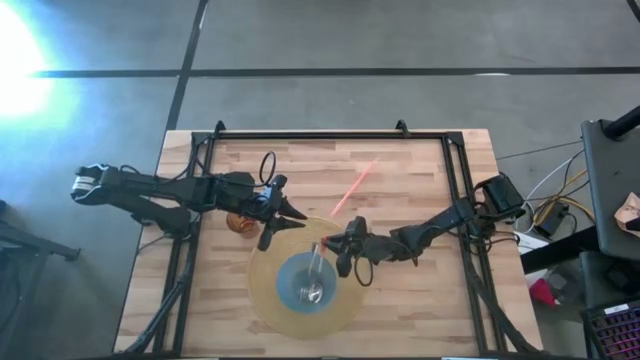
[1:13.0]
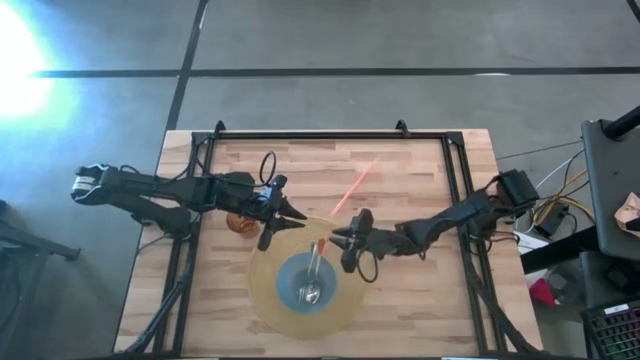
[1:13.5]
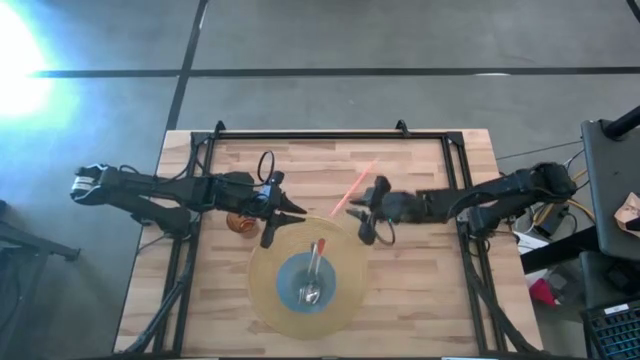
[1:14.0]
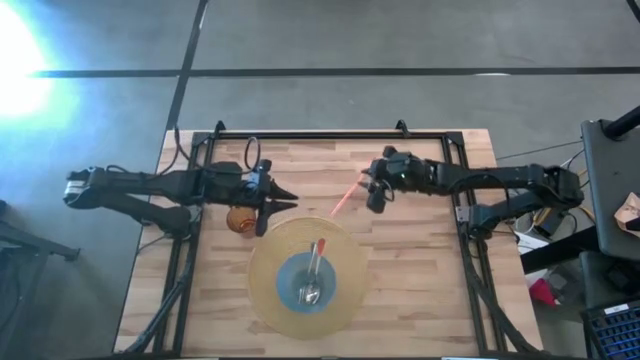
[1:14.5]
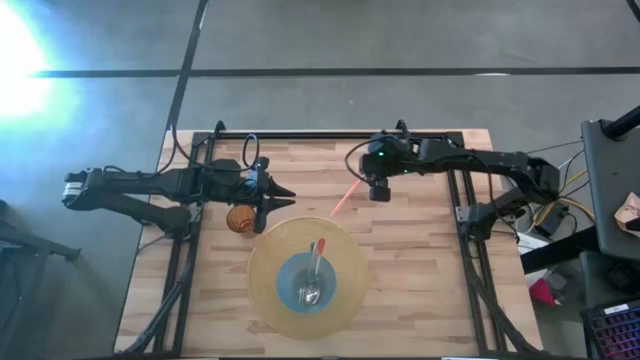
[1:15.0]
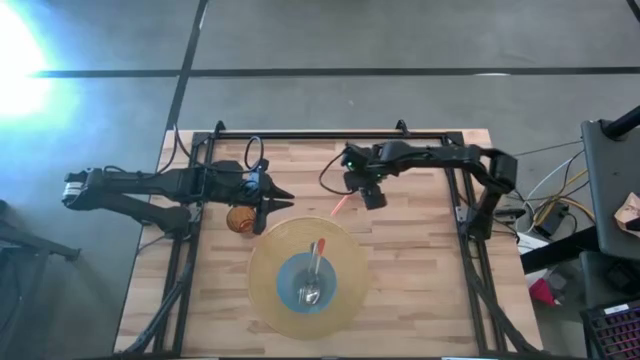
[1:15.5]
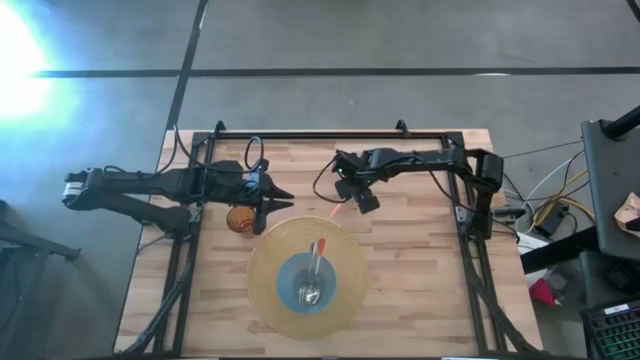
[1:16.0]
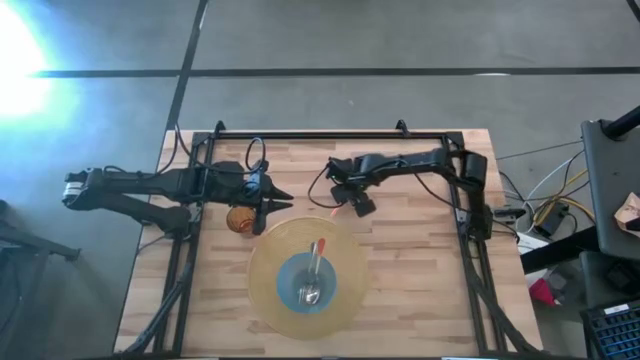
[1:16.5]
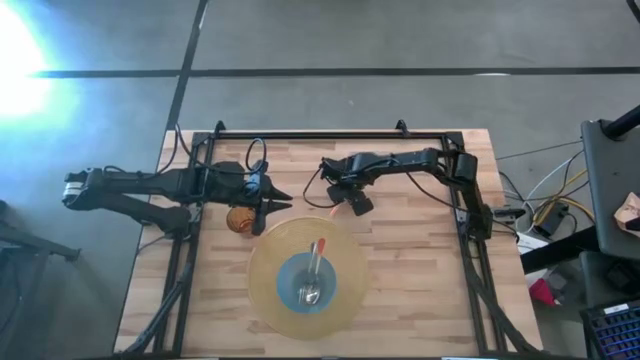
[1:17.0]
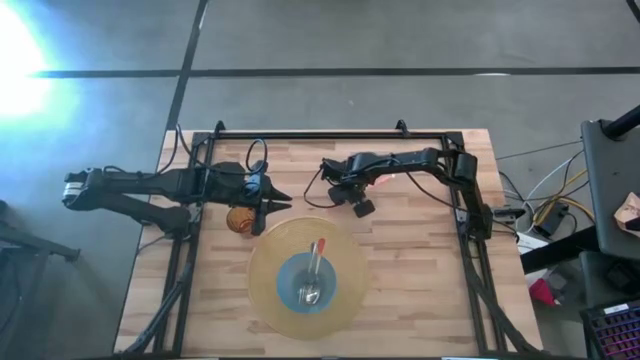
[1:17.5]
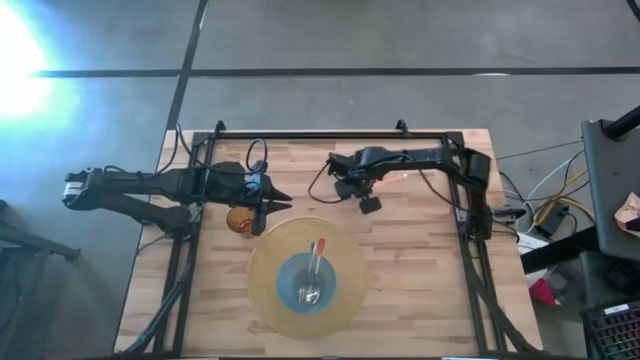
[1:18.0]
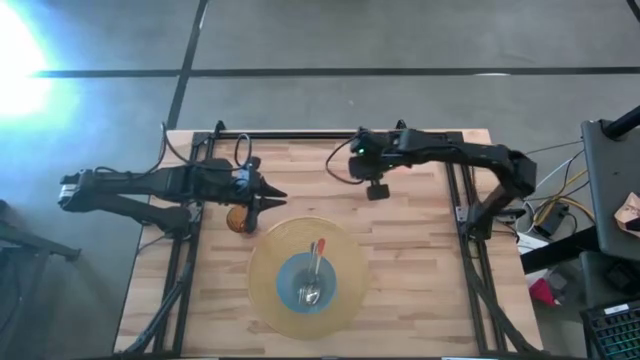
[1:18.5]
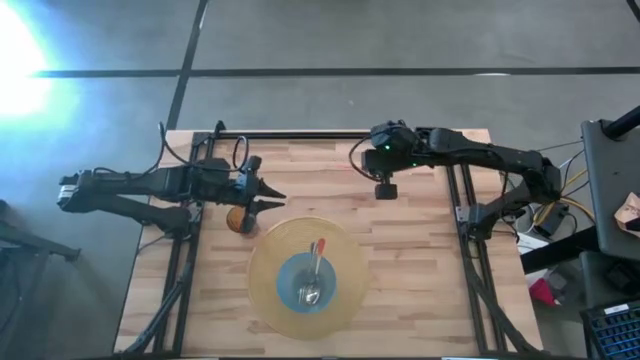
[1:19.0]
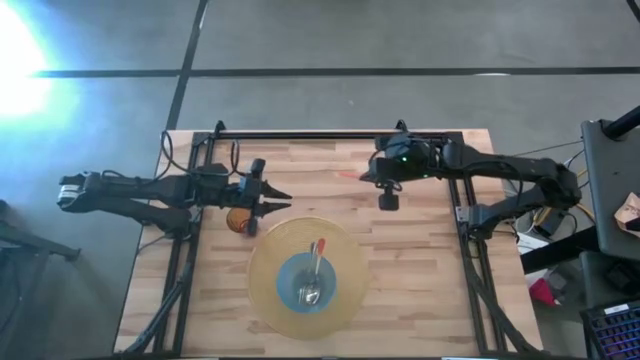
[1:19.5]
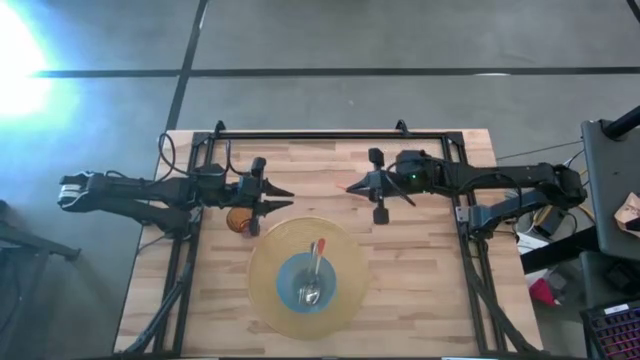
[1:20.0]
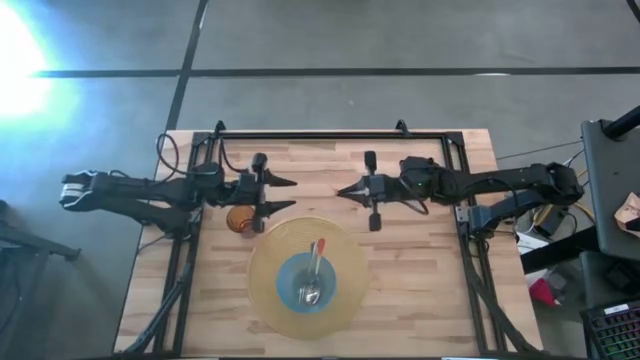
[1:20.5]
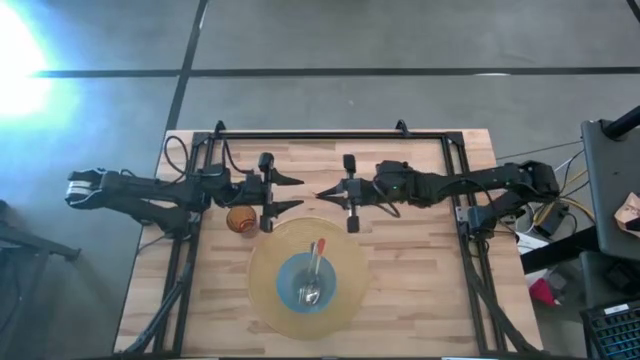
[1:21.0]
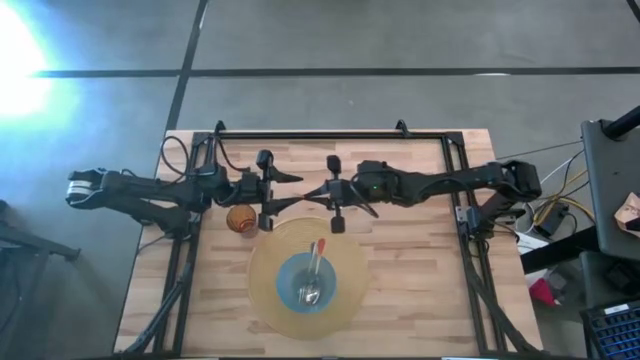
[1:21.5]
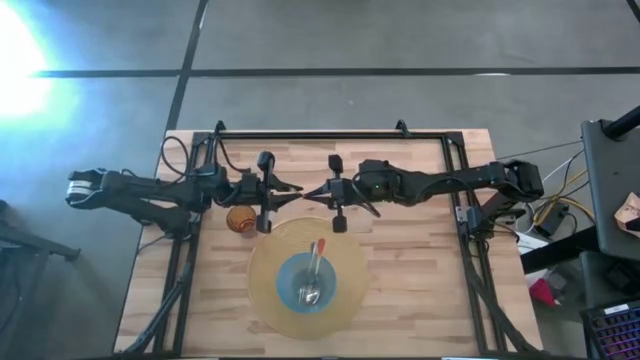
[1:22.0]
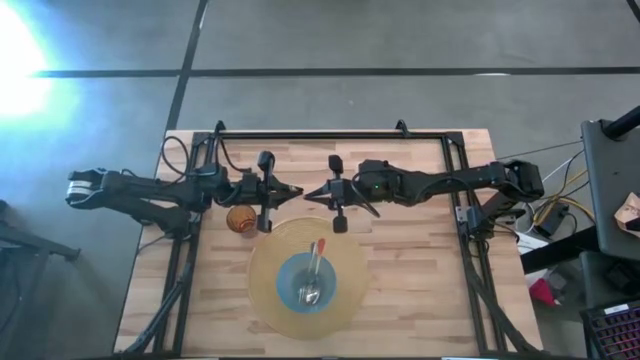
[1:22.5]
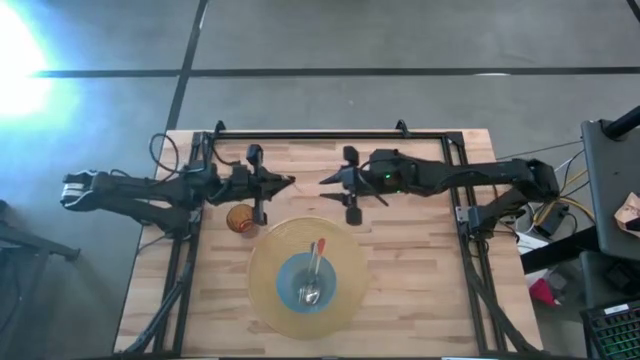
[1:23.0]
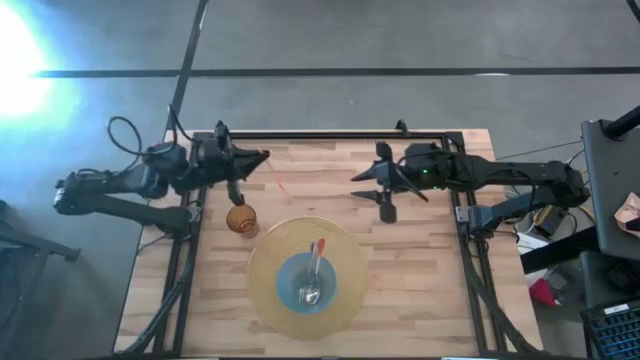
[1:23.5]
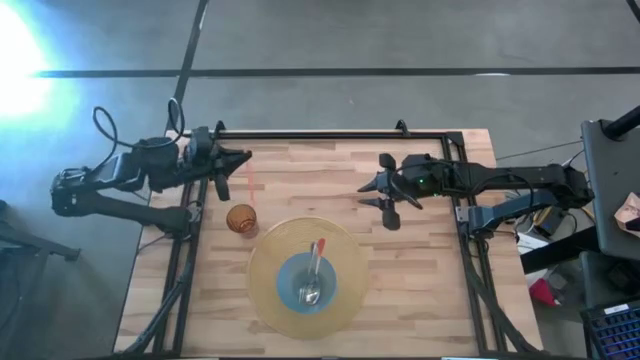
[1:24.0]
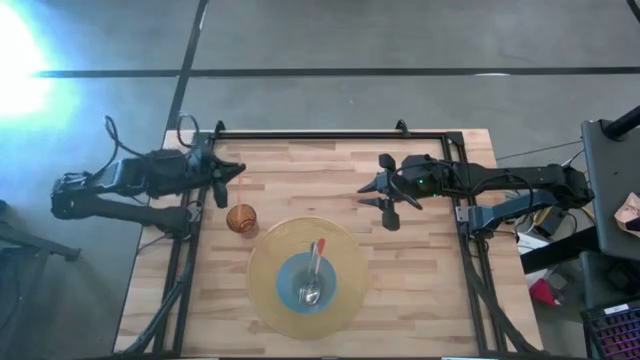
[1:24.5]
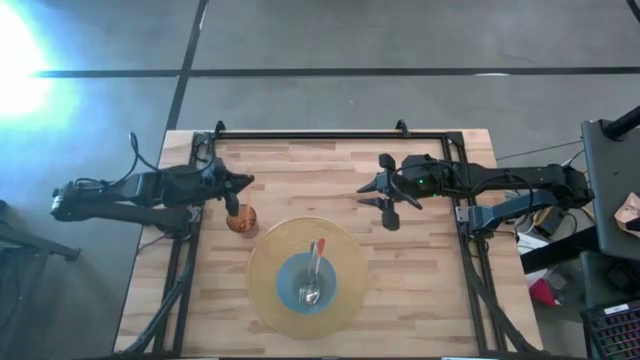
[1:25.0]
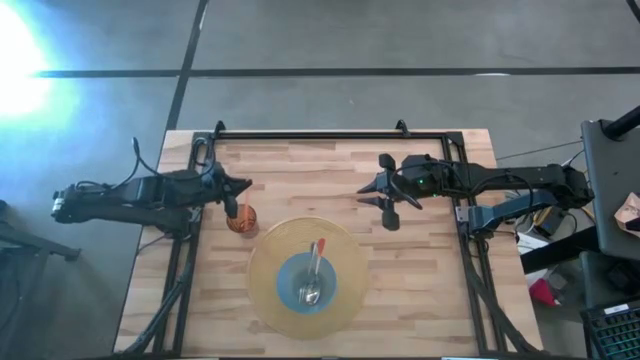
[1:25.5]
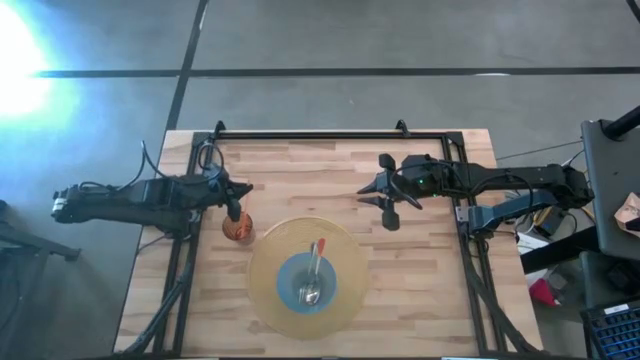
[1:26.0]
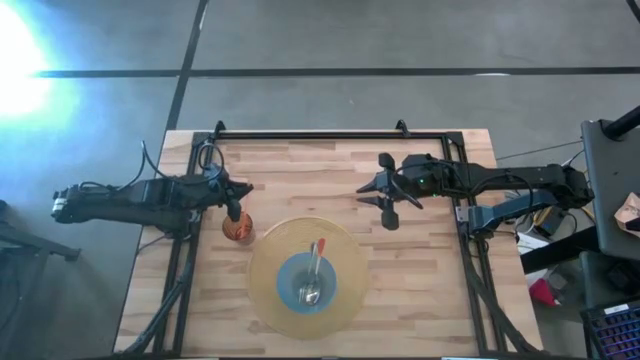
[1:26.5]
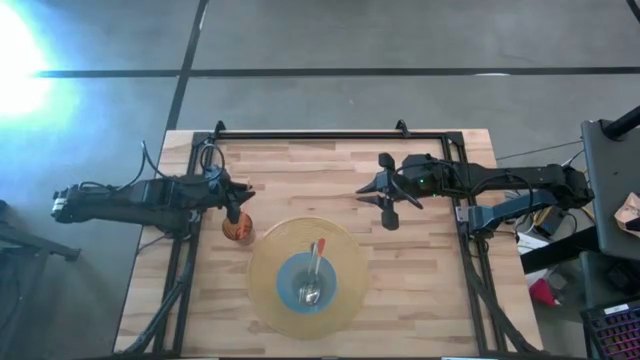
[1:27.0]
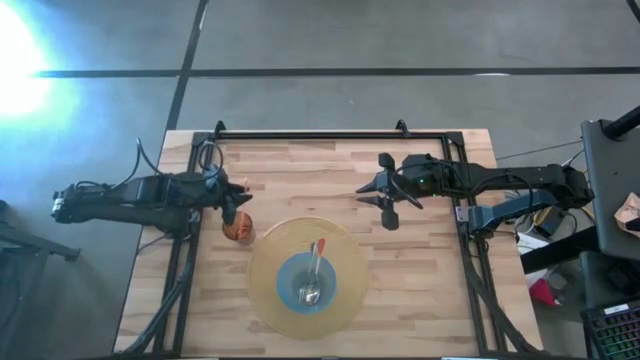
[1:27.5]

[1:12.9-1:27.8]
Task: Pick & Place Utensil
Put the orange straw into the brown cup on the brown mat

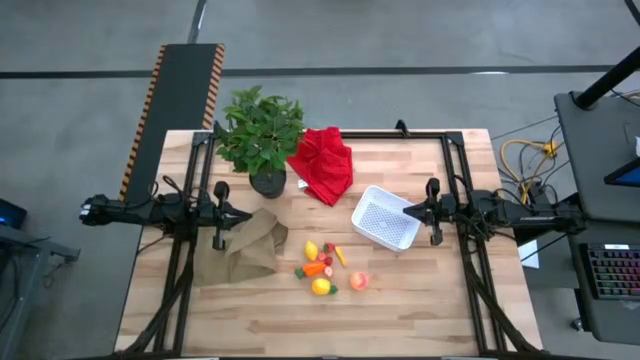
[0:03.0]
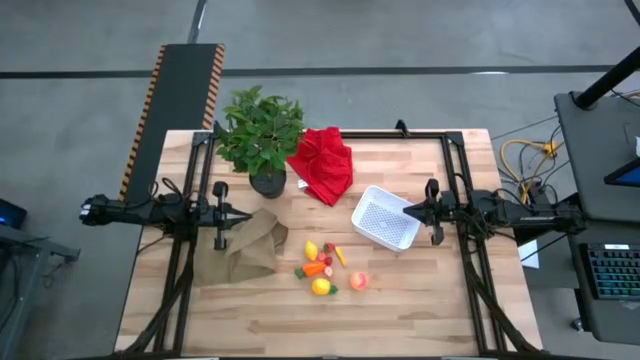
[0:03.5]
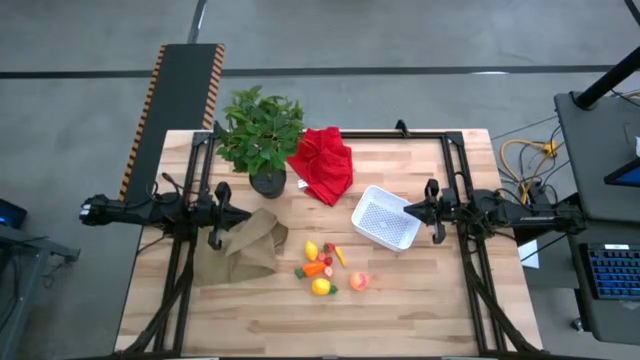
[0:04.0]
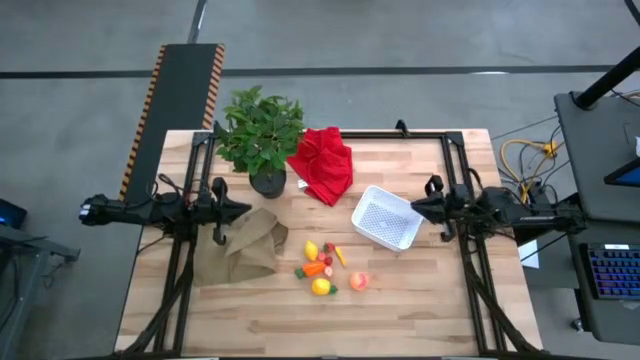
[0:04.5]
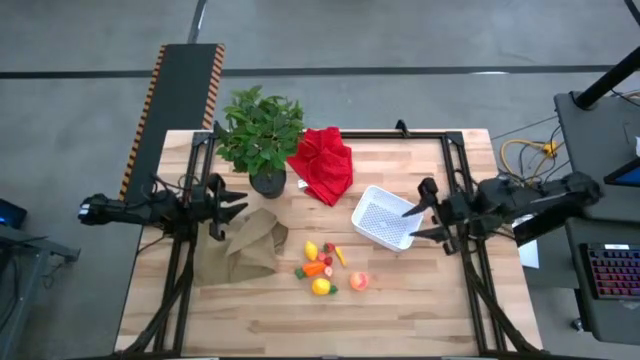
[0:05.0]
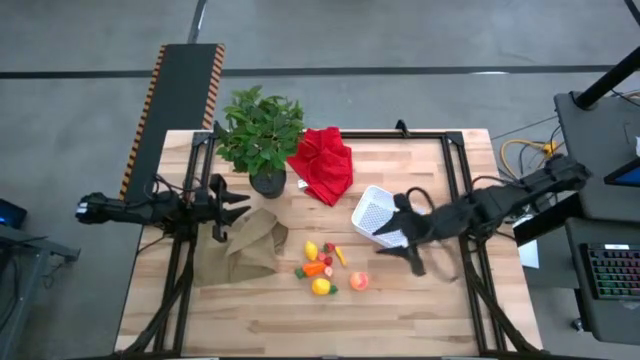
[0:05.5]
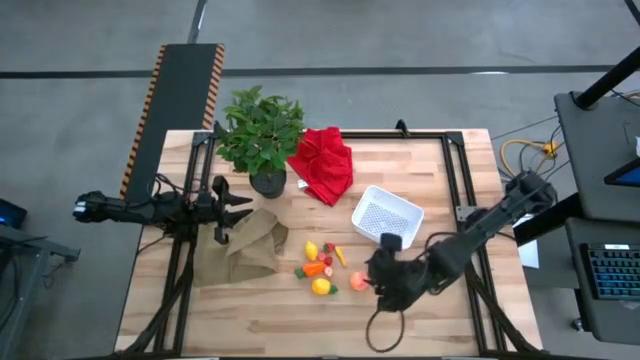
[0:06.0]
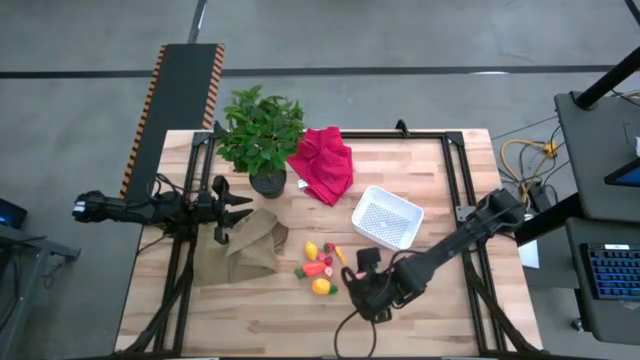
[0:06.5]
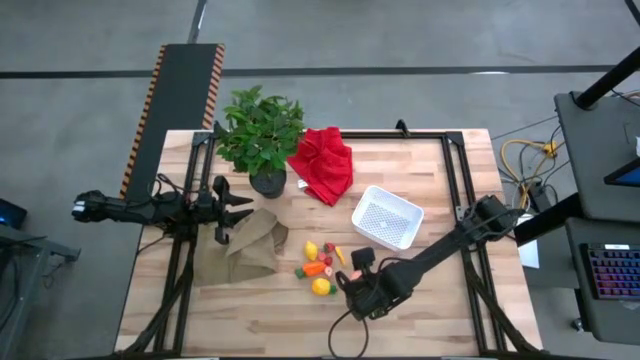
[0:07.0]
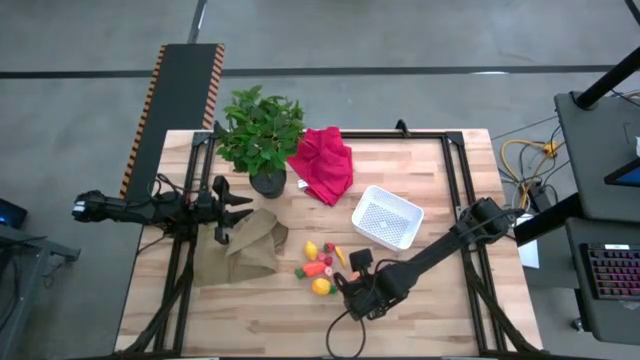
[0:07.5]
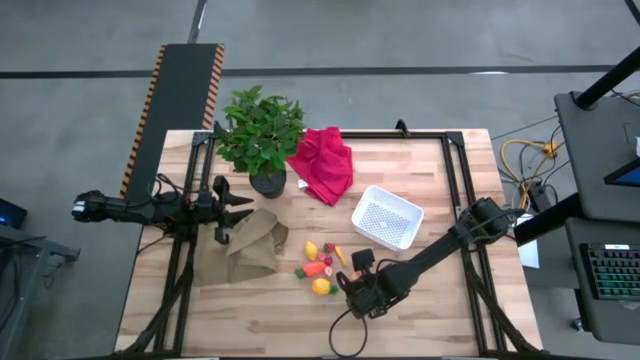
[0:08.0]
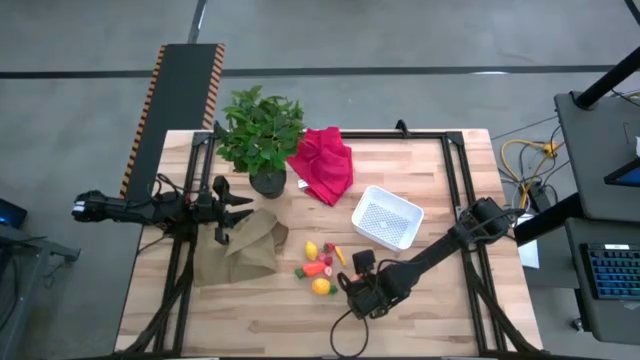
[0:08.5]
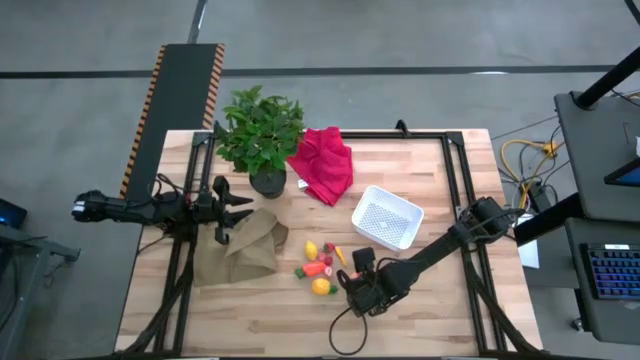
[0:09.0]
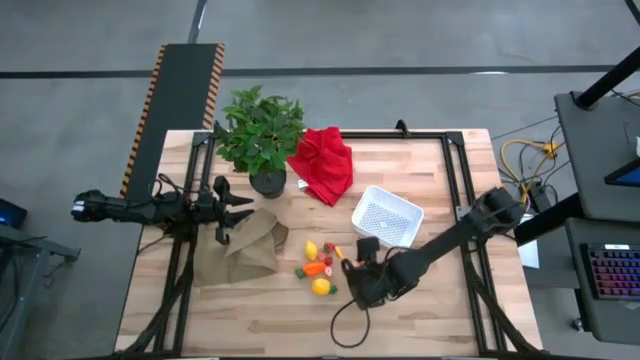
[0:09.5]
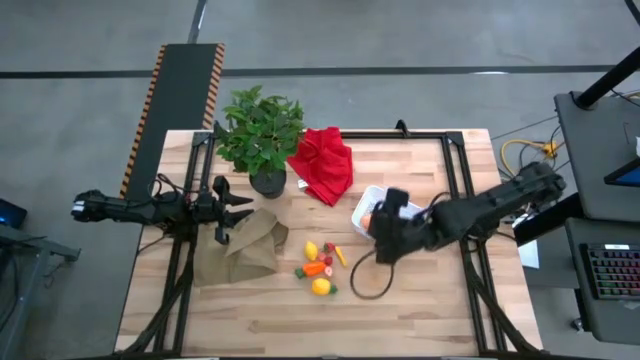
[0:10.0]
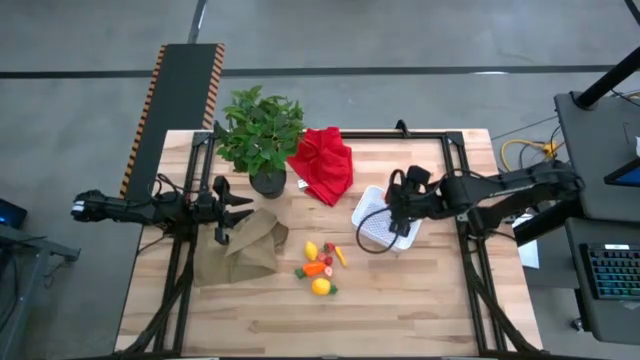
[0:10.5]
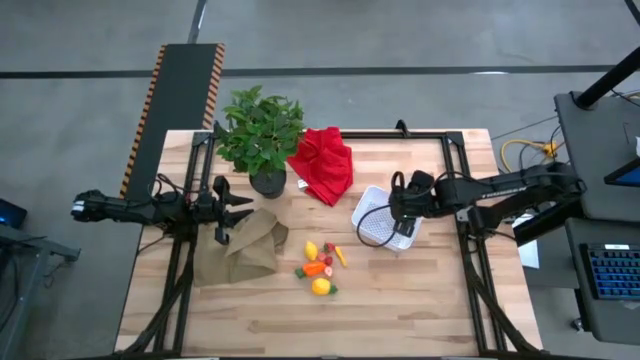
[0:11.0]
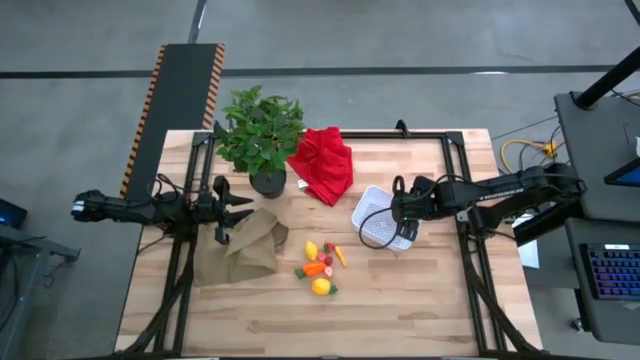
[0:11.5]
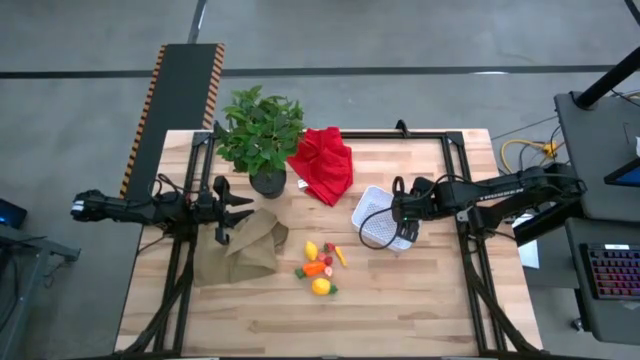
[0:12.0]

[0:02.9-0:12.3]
Task: Pick and placing Produce into tupperware
Put the pink peach into the white bin
